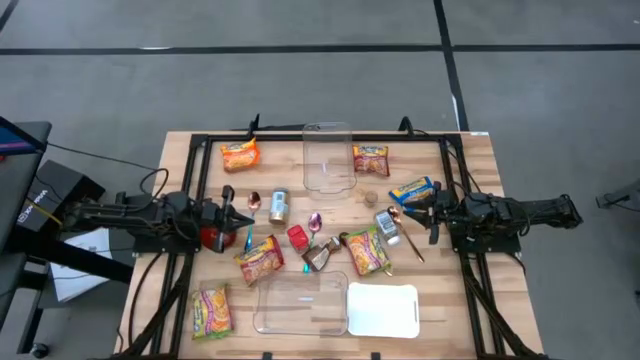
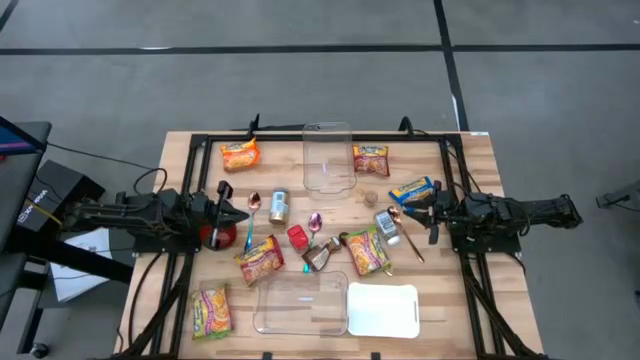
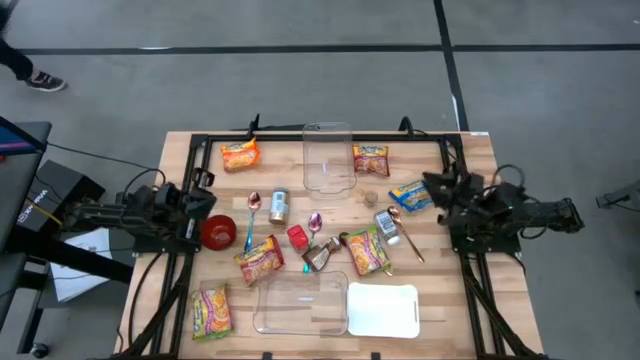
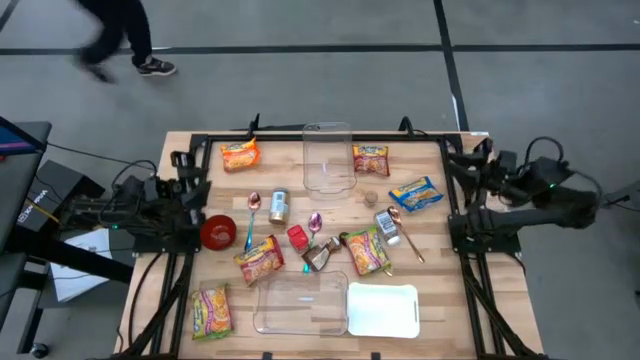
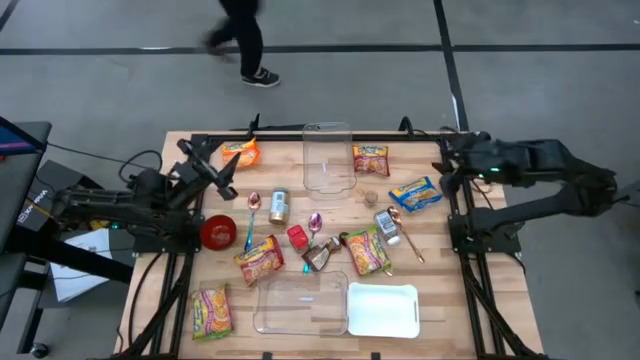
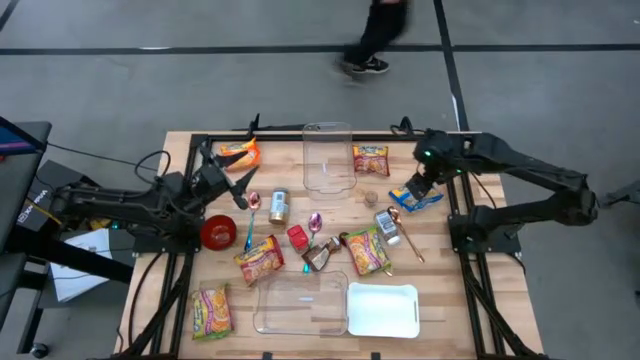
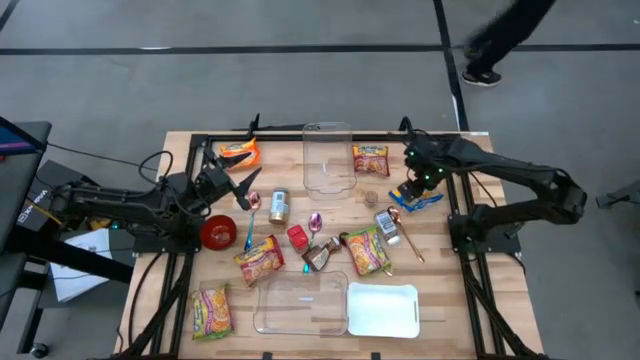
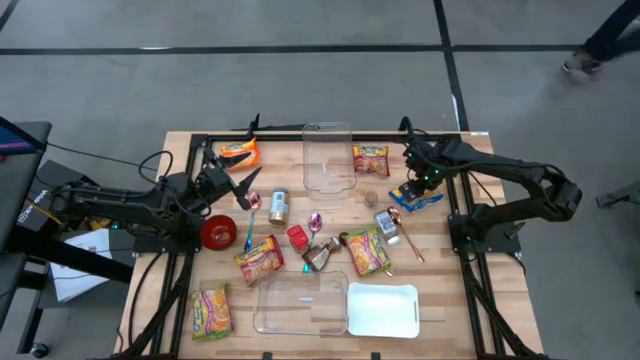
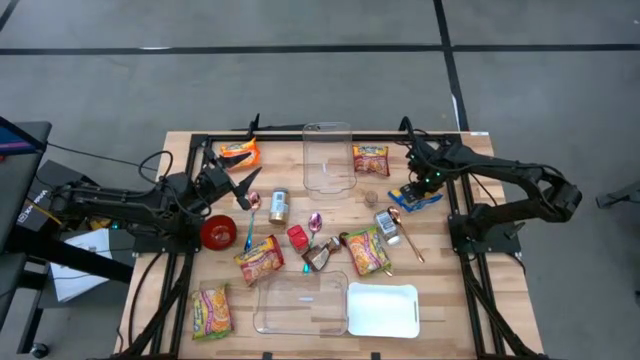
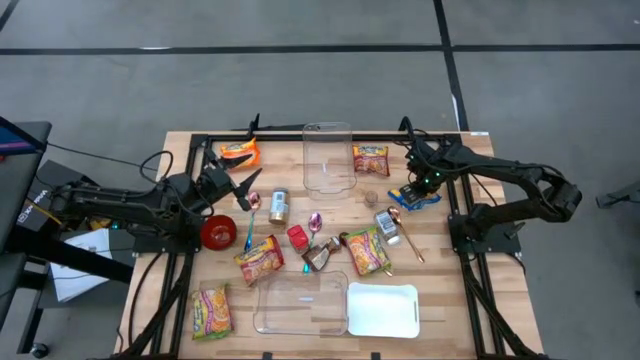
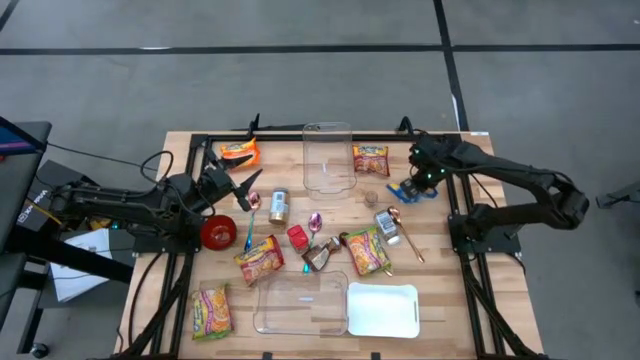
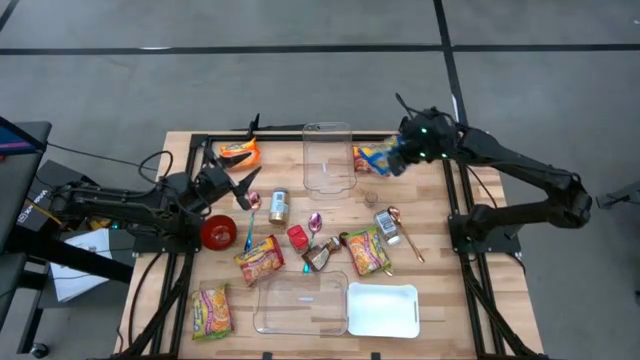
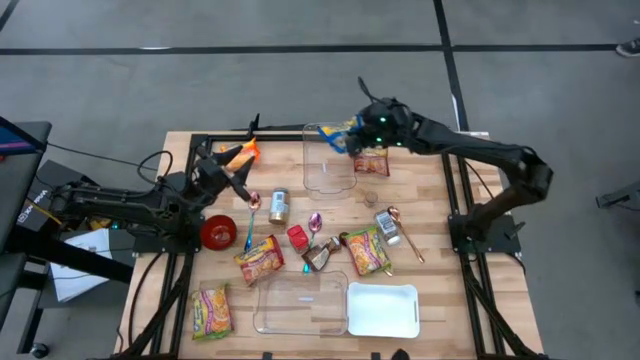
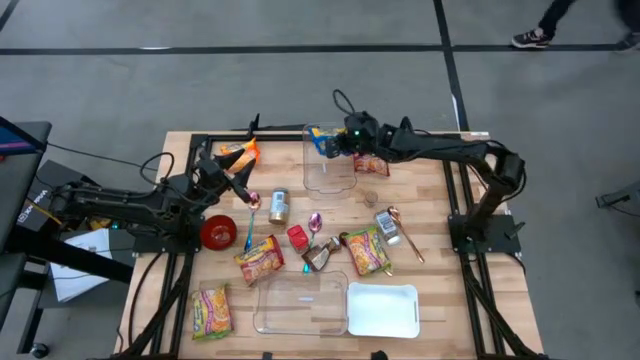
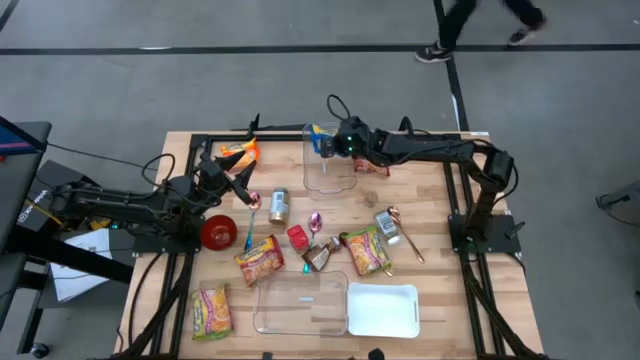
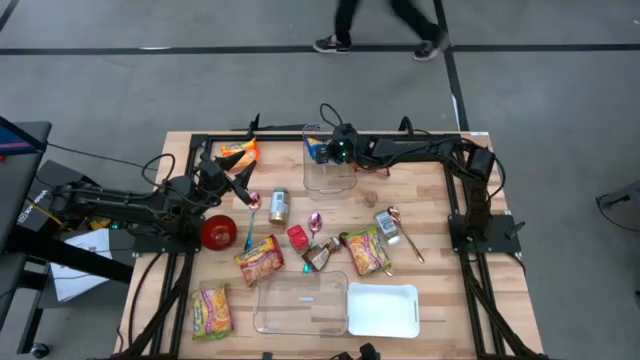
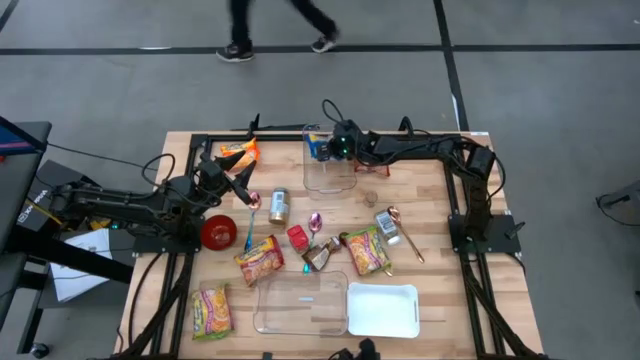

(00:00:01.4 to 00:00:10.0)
Task: Pick & Place Food Item
Put the blue noodle pack into the top transparent bin

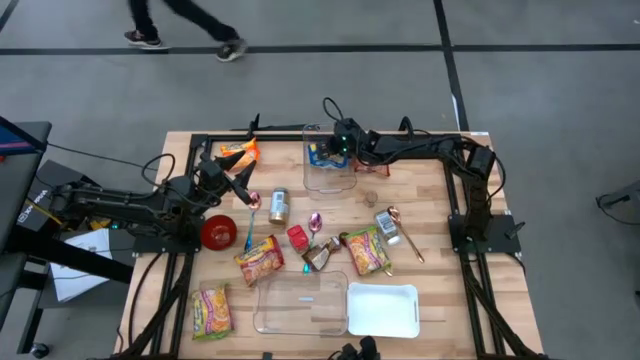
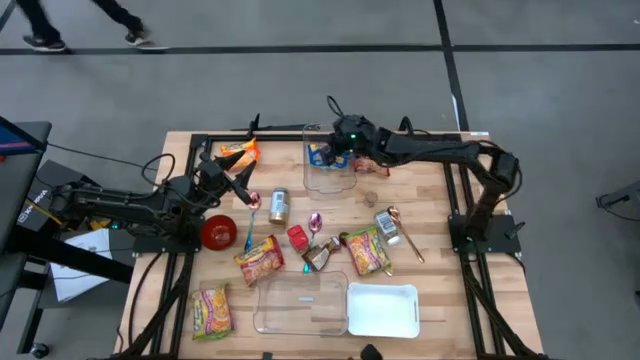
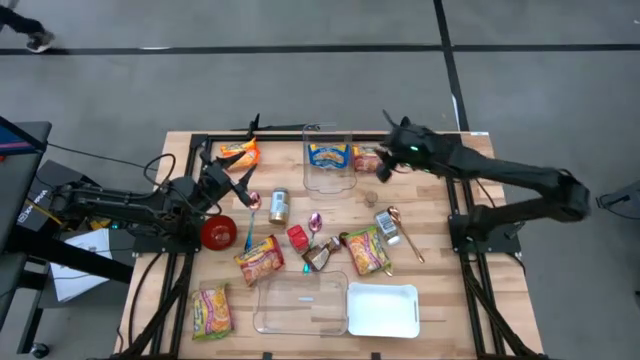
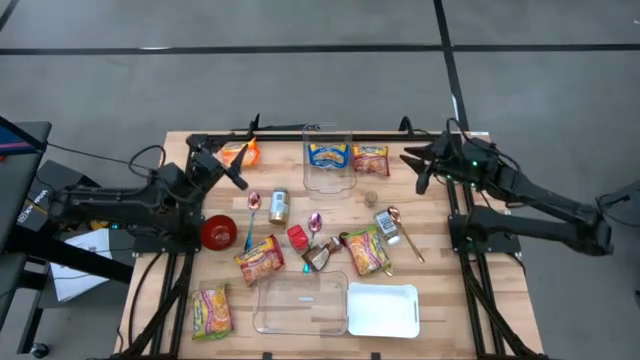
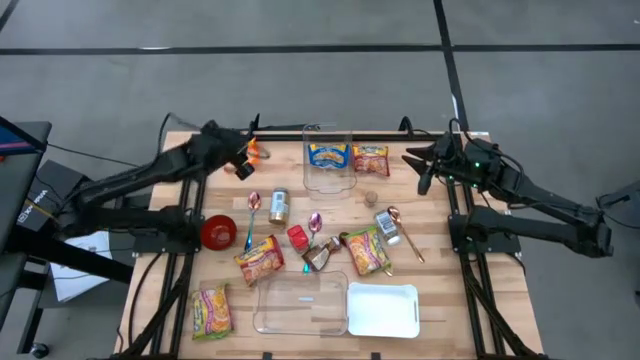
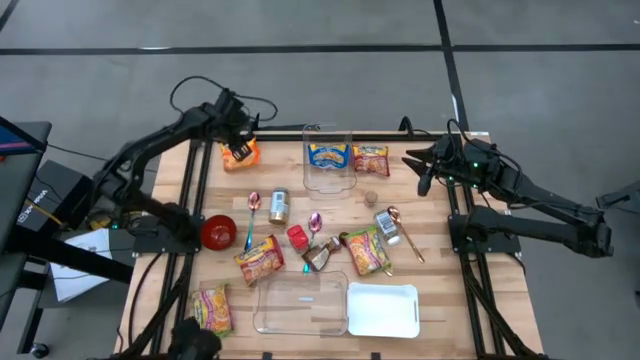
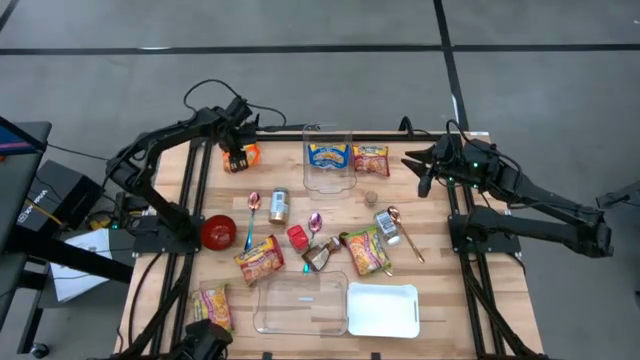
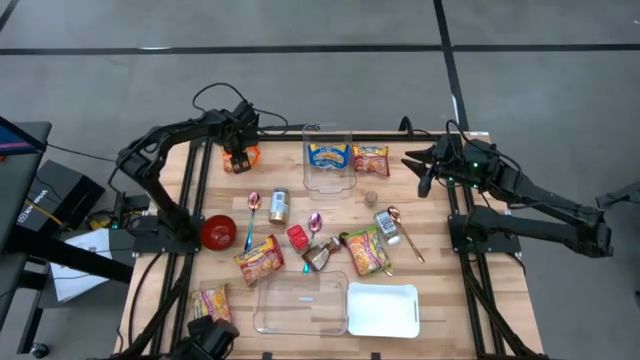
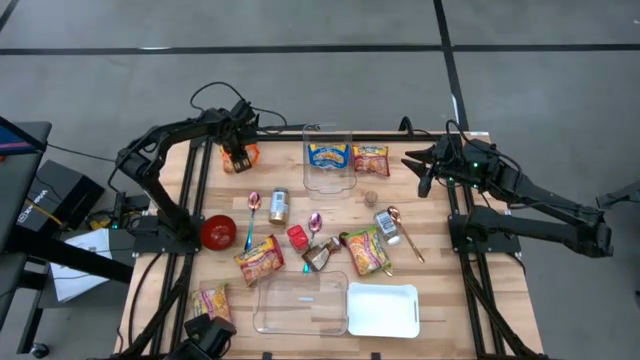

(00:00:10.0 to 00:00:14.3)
Put the orange noodle pack into the top transparent bin

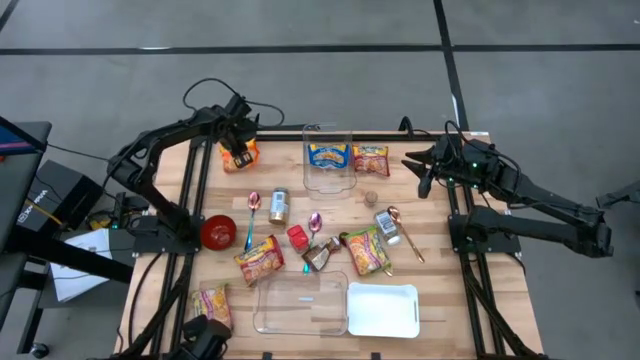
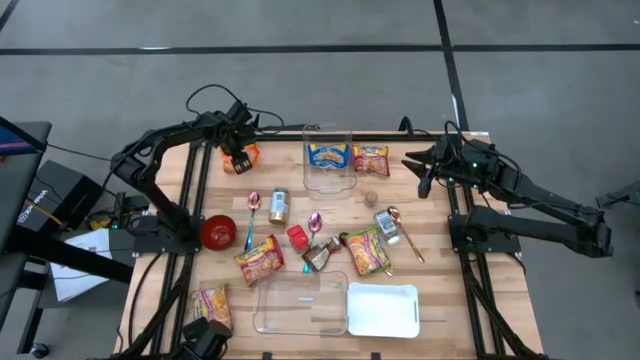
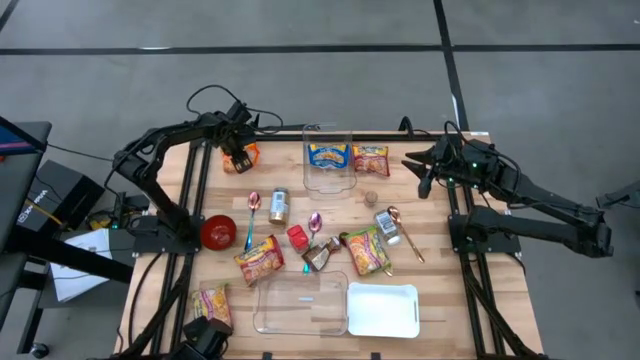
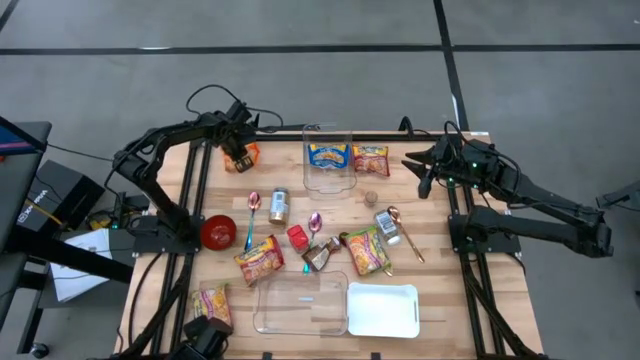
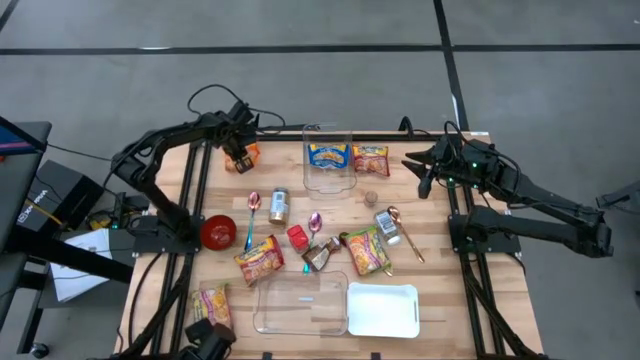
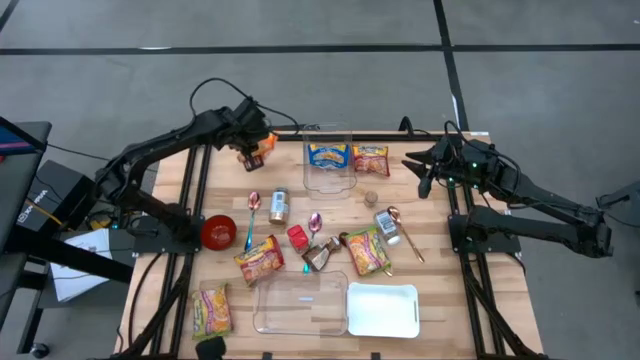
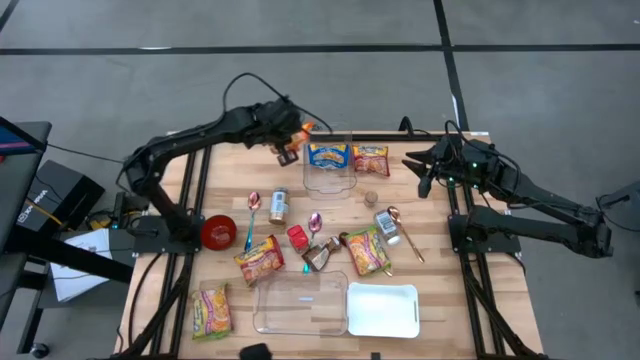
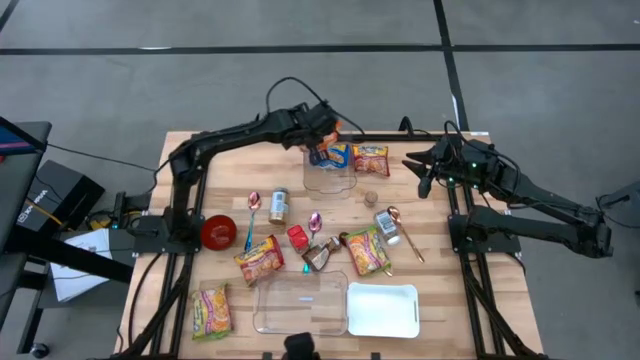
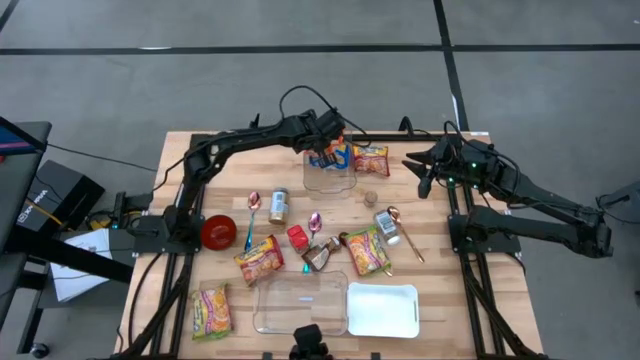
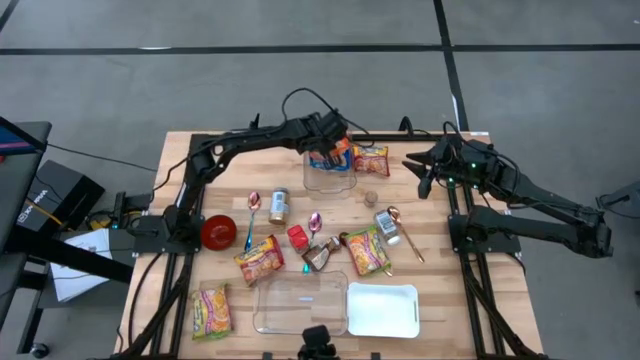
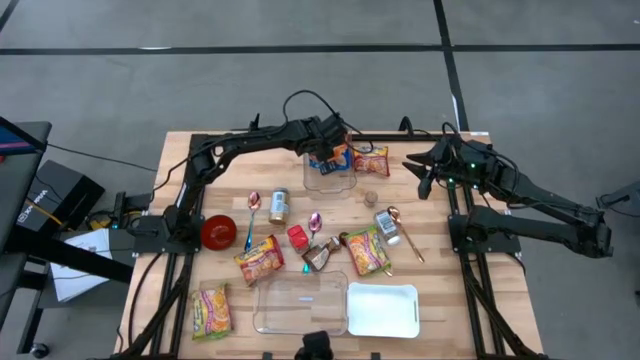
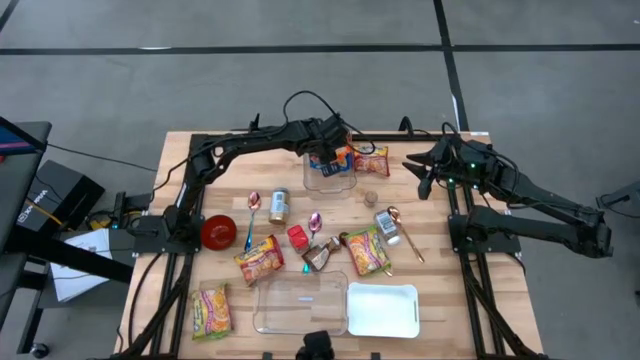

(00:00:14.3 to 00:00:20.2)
Put the orange noodle pack into the top transparent bin

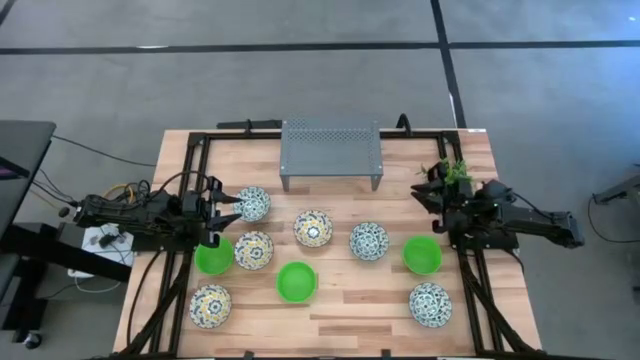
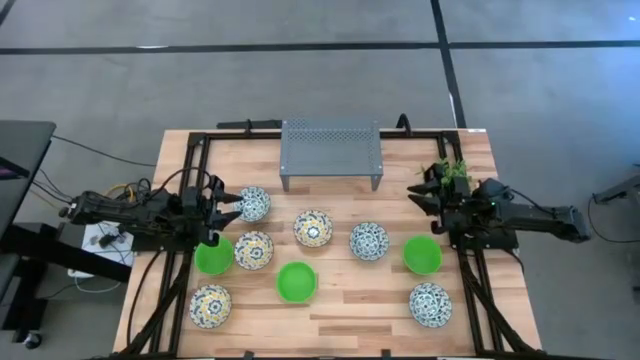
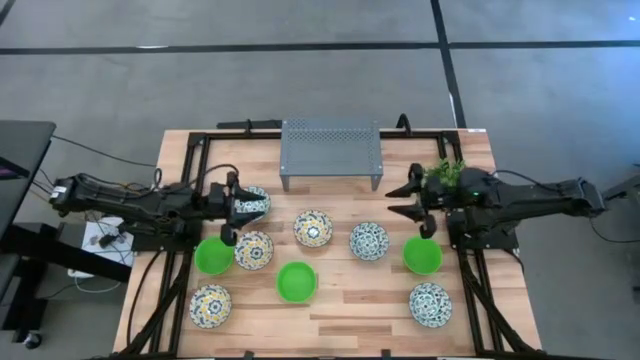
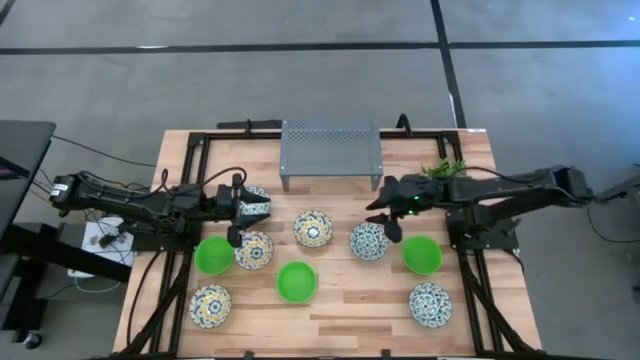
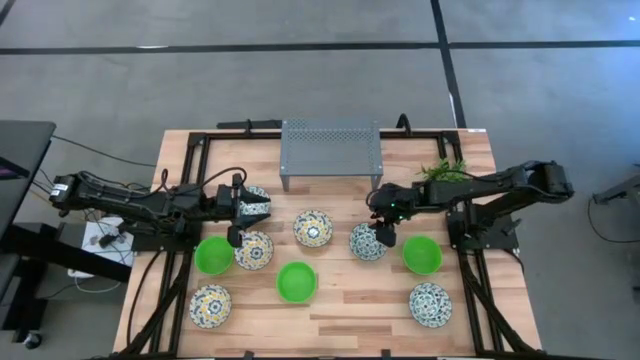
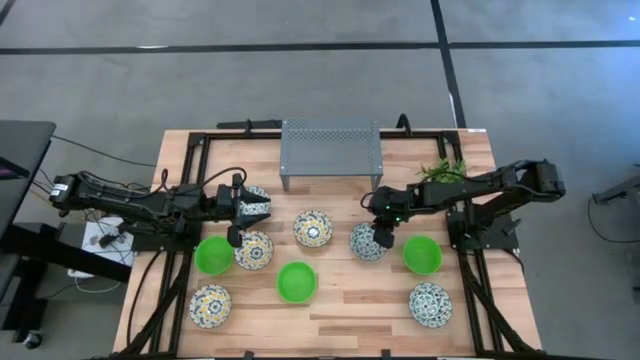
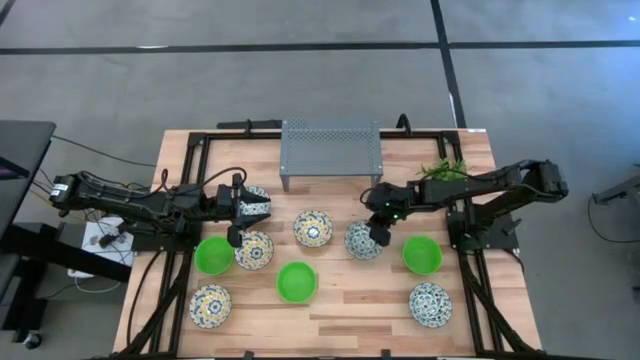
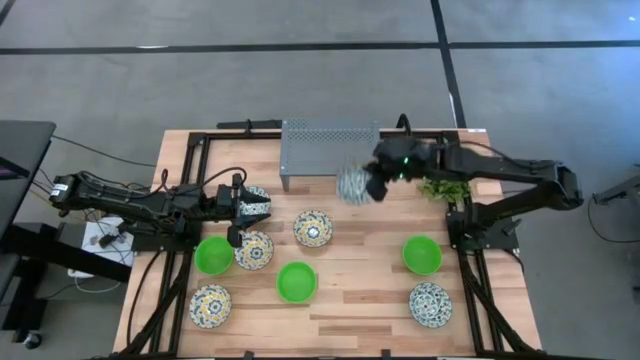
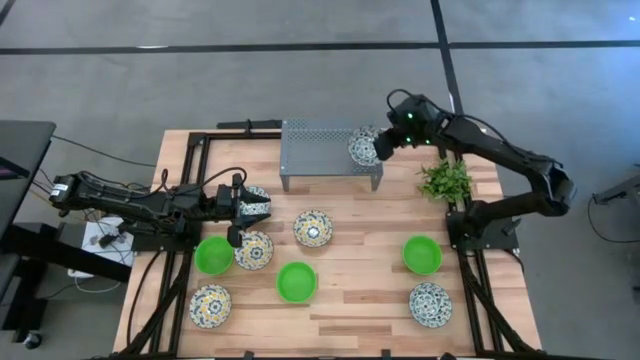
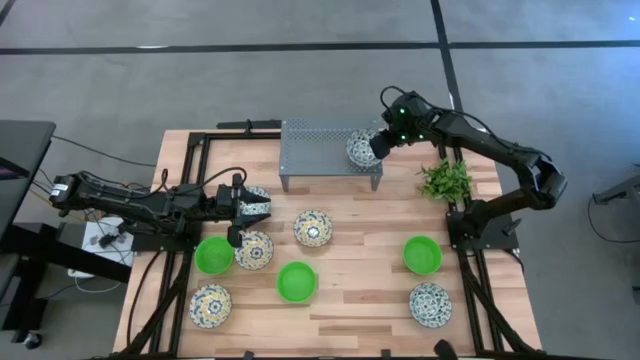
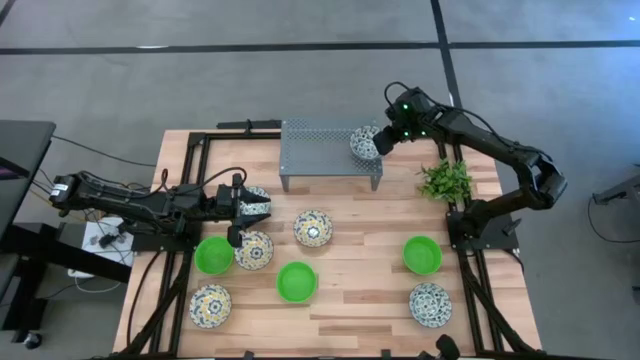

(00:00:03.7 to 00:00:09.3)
Task: Pick & Place Mini bowls
Put the middle green patterned bowl on the shelf
